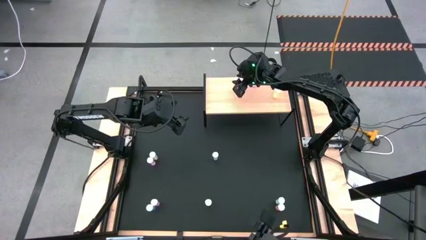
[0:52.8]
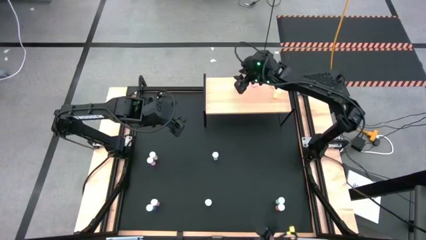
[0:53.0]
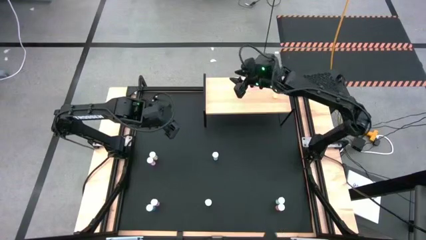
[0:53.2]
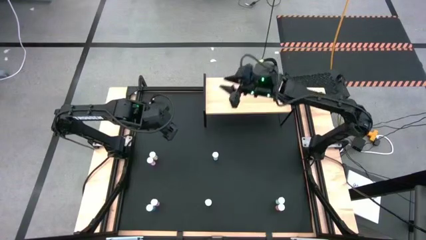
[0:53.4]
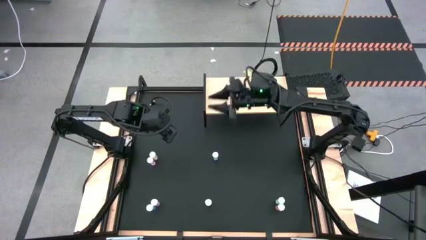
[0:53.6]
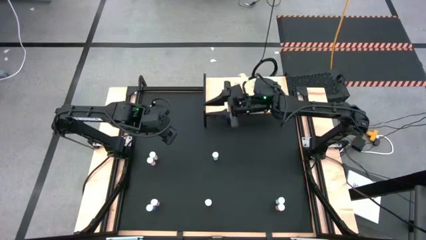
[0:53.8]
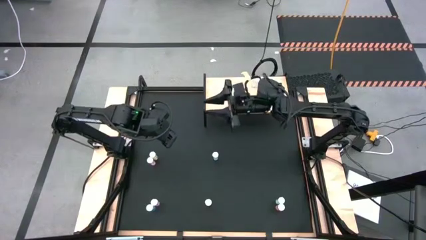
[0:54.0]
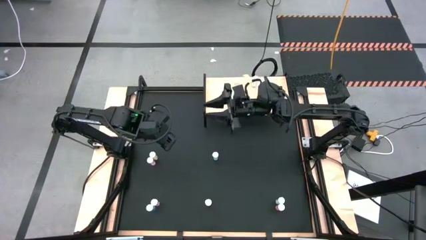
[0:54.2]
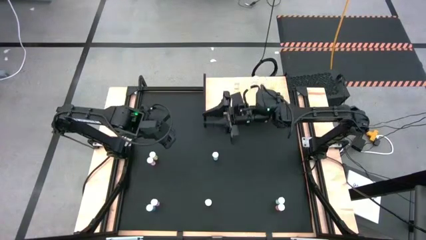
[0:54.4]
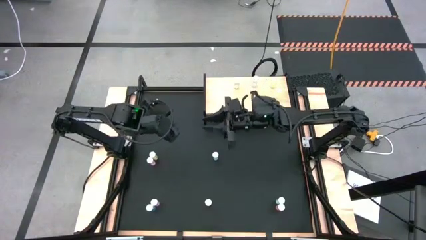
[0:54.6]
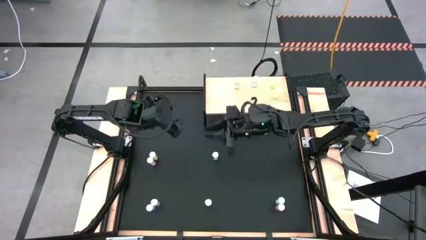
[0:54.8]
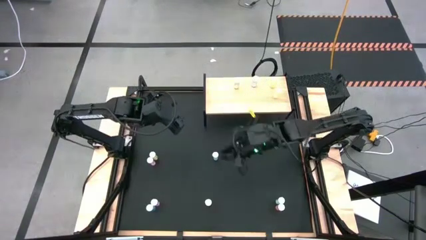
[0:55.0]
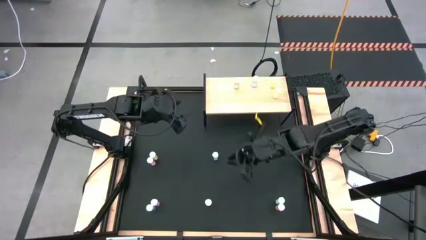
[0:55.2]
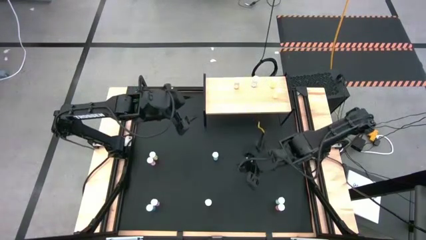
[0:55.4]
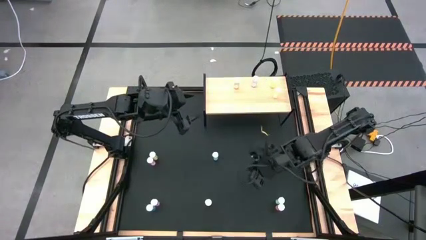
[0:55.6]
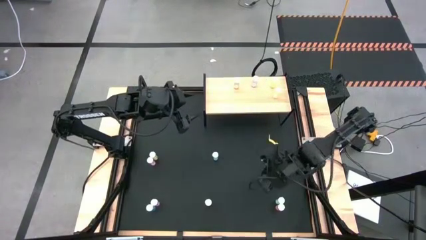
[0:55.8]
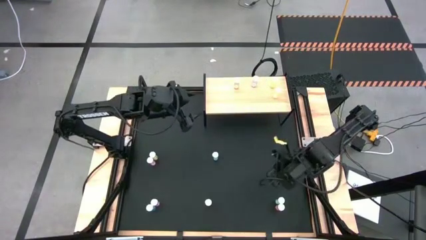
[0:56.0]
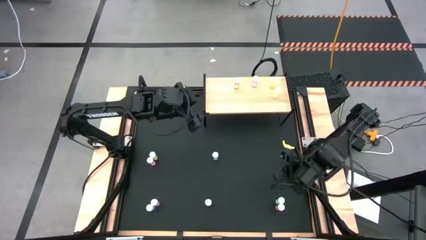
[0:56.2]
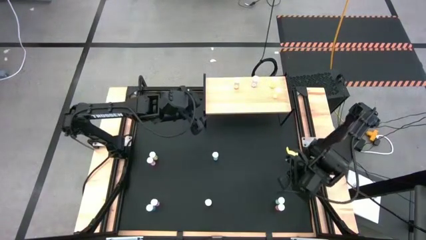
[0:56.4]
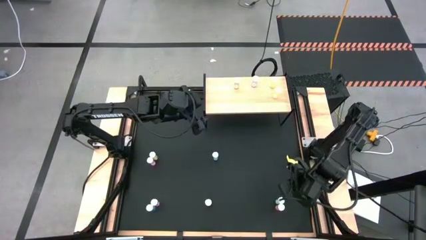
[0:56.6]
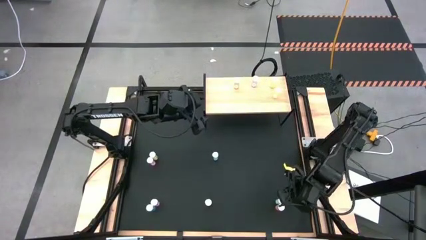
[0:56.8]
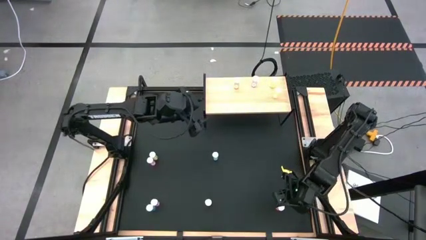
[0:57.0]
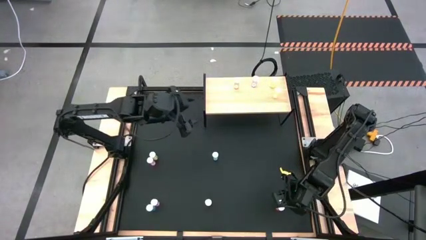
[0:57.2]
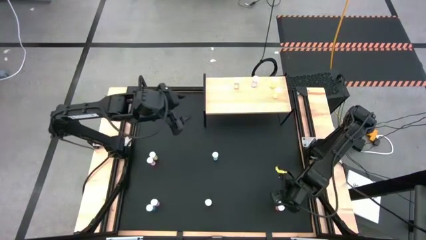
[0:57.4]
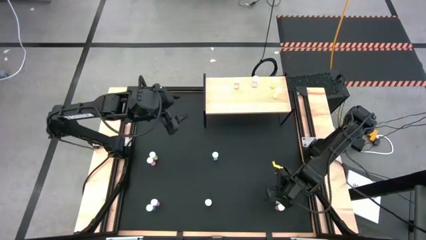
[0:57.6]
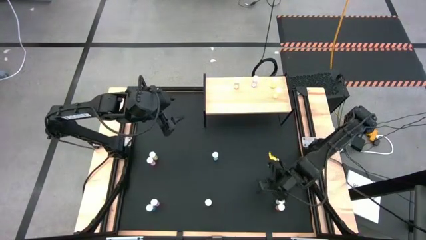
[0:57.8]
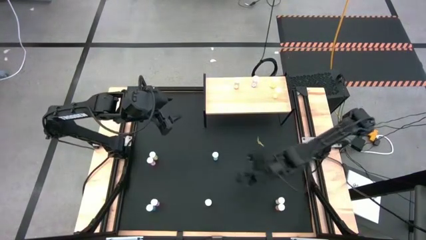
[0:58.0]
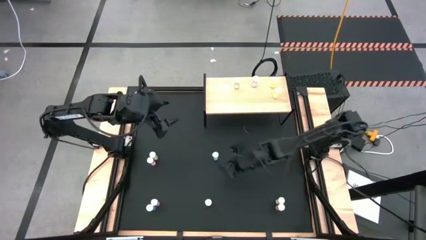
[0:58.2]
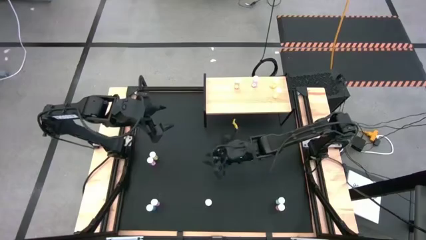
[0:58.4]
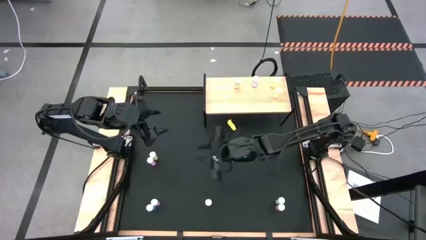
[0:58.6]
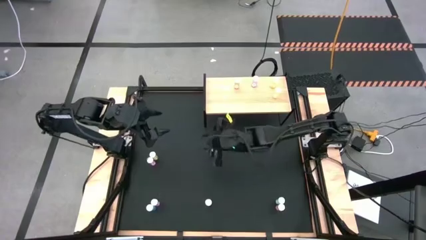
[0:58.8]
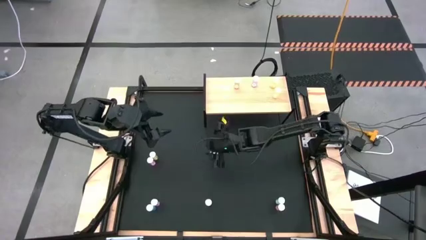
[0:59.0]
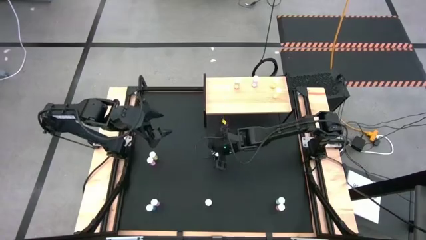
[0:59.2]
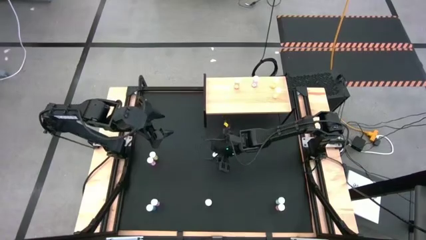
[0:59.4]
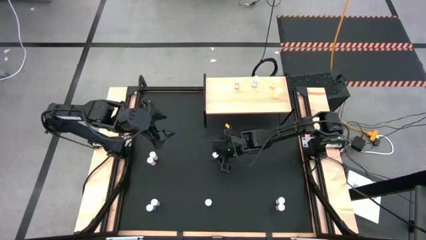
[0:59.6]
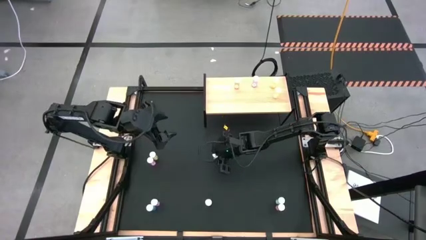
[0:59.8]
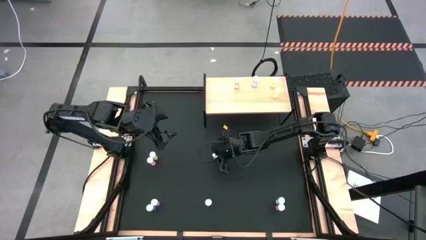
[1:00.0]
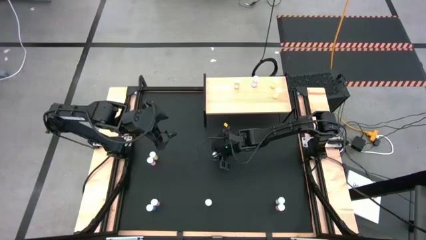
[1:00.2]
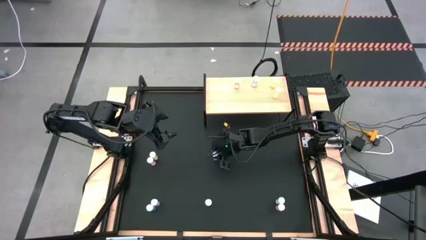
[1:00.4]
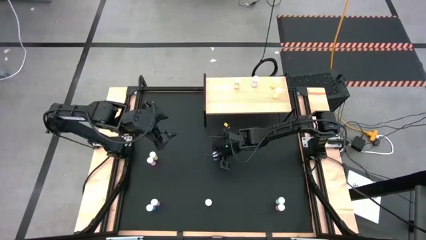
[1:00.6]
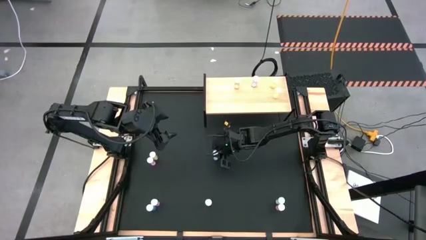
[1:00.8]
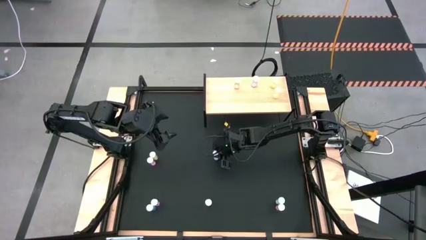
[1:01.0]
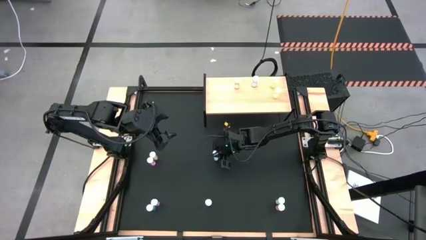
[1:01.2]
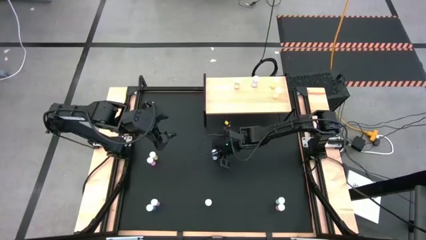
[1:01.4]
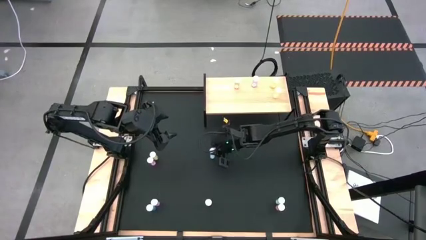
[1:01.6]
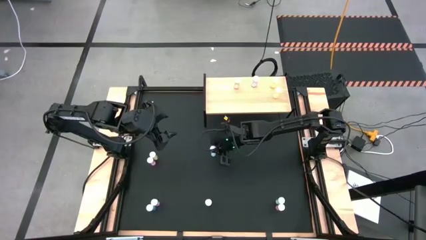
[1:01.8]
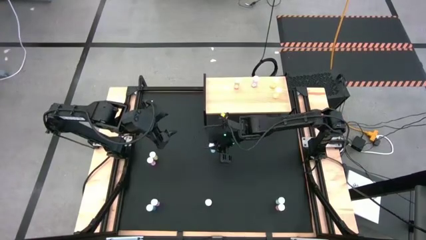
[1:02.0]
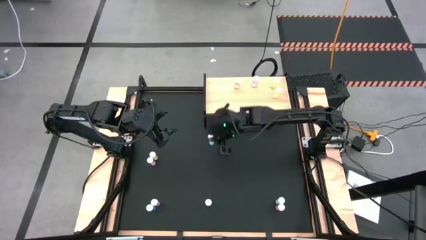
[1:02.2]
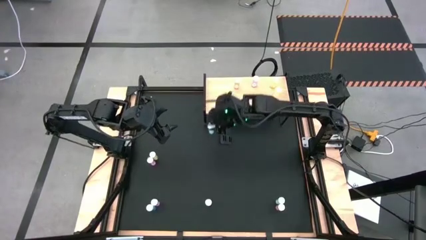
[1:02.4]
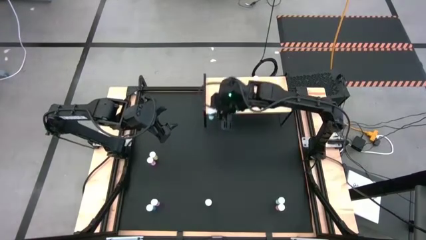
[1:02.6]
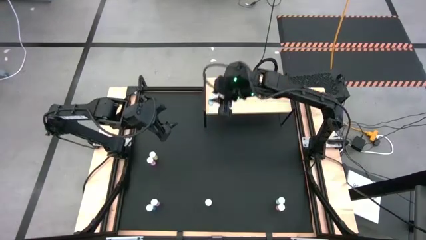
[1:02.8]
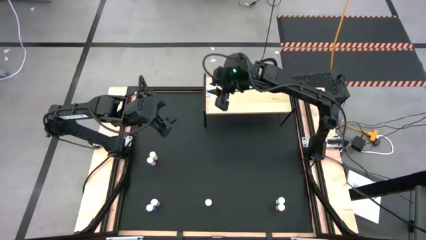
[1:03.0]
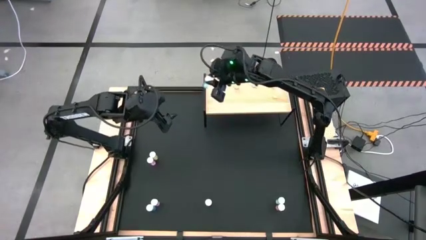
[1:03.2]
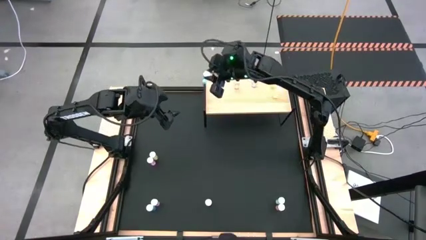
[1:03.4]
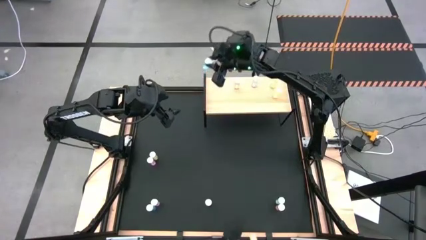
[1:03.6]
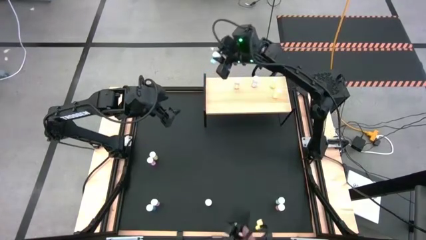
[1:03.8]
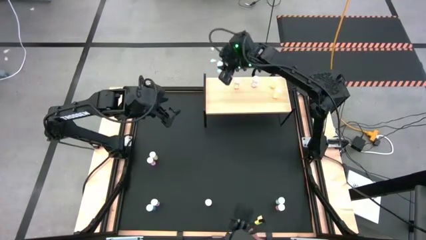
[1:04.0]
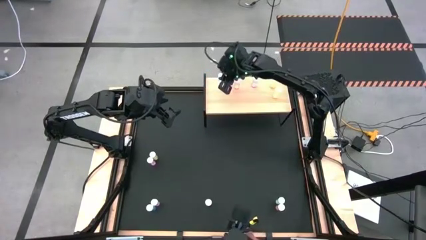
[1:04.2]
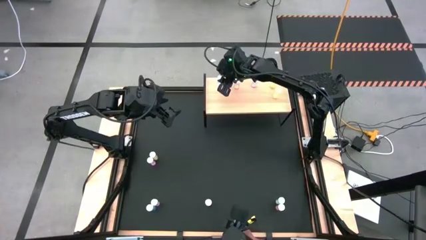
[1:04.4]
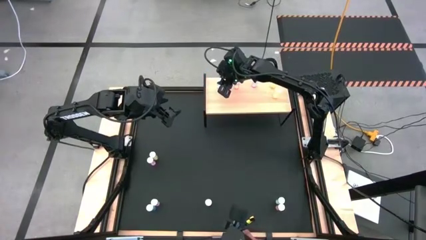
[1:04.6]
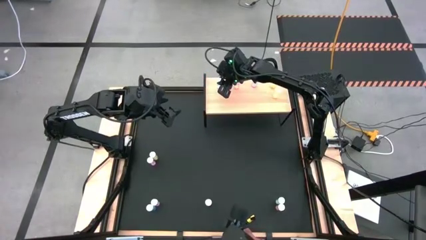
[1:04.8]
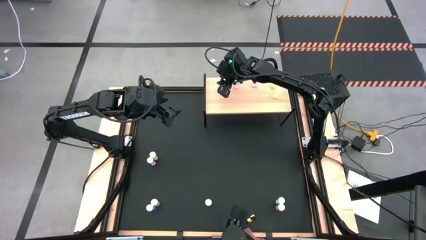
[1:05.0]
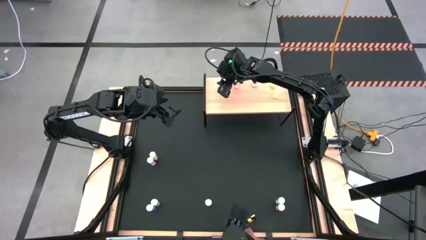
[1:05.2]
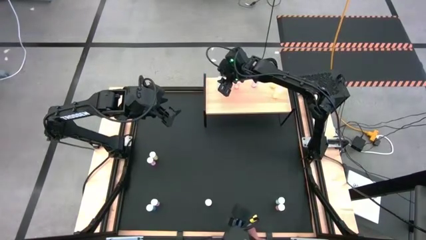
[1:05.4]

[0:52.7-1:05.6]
Task: Pick and place medicine bottles onto shelf by color
Put the top middle blue pill bottle on the shelf

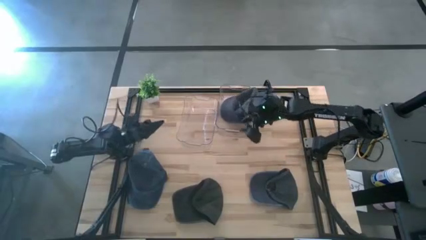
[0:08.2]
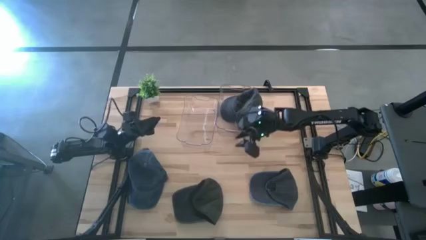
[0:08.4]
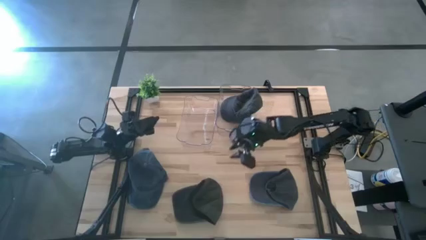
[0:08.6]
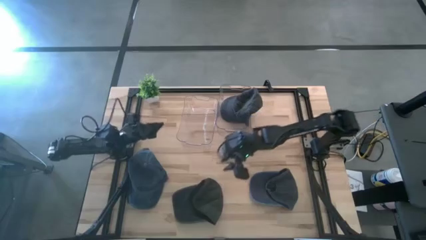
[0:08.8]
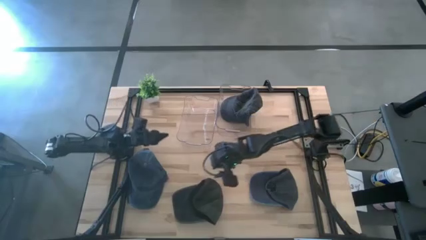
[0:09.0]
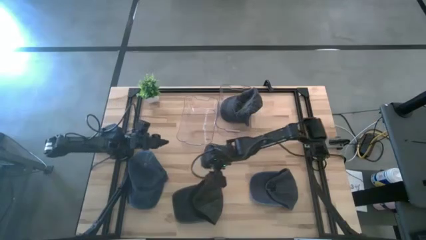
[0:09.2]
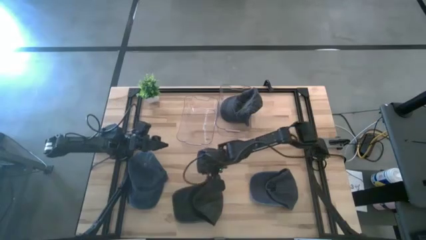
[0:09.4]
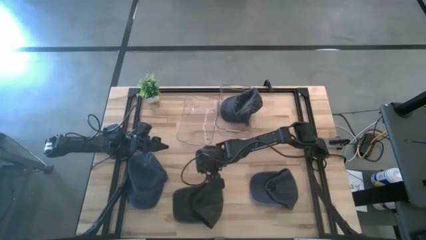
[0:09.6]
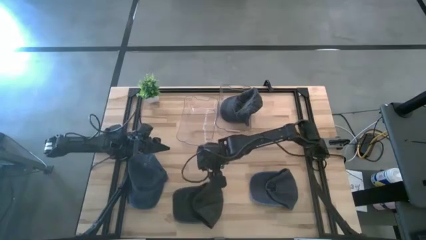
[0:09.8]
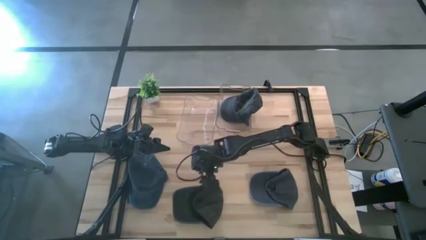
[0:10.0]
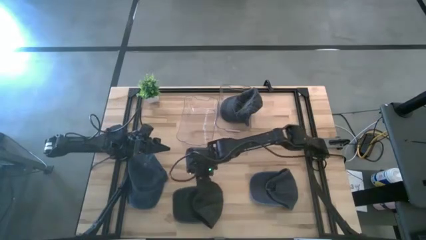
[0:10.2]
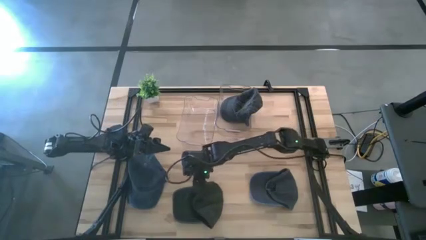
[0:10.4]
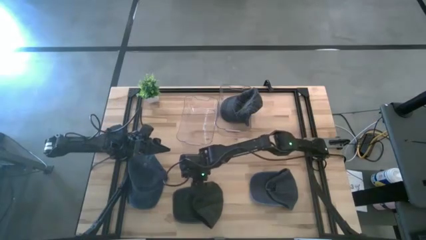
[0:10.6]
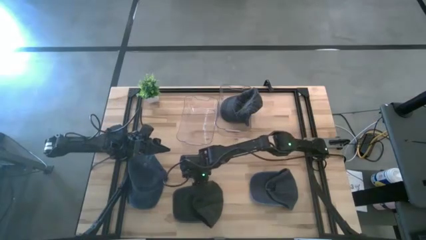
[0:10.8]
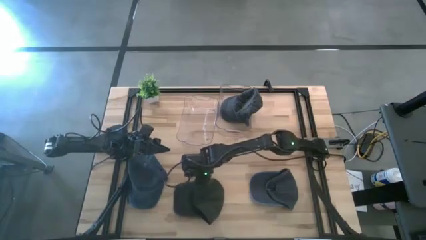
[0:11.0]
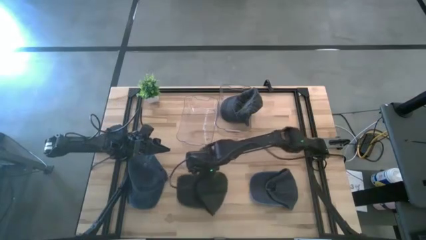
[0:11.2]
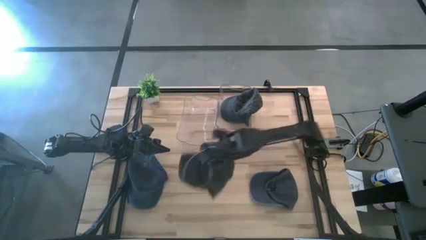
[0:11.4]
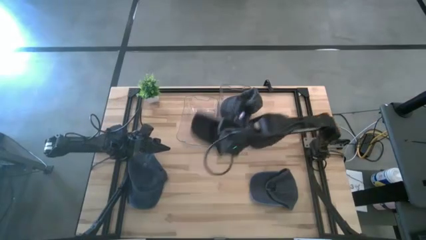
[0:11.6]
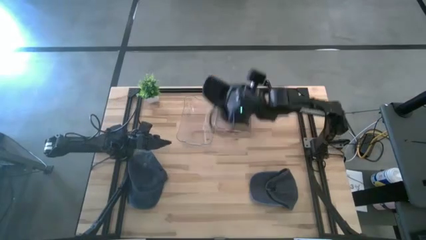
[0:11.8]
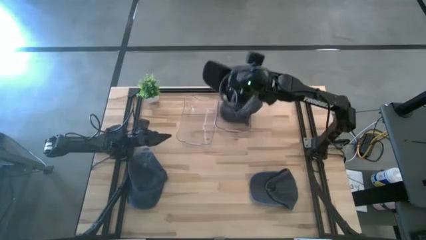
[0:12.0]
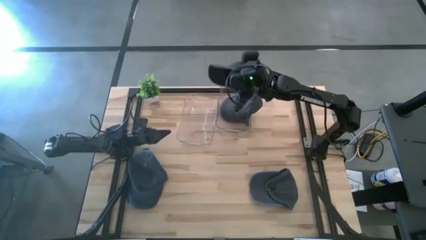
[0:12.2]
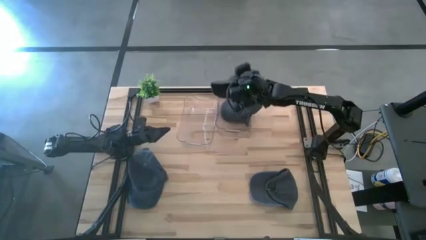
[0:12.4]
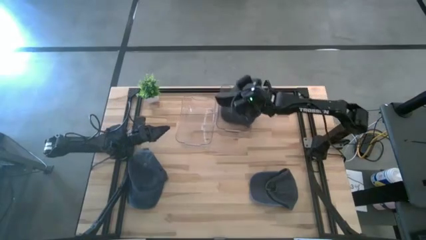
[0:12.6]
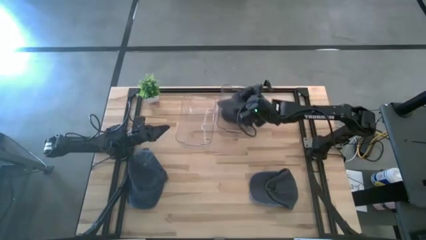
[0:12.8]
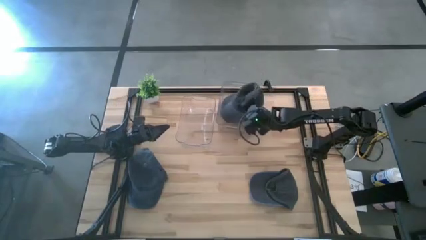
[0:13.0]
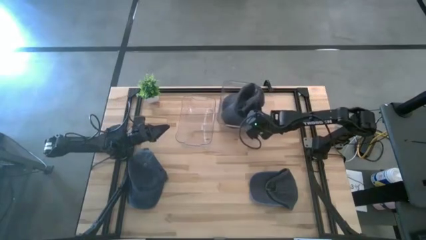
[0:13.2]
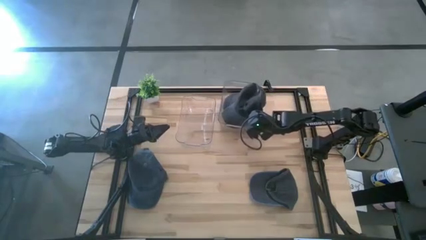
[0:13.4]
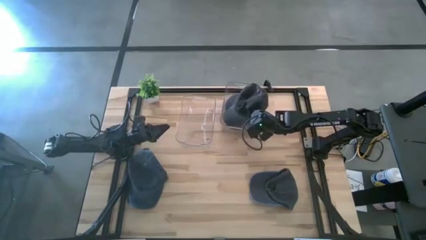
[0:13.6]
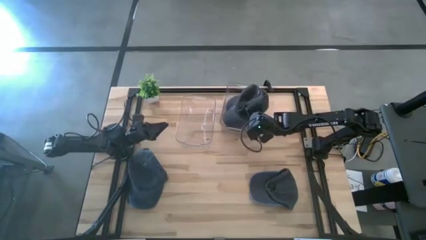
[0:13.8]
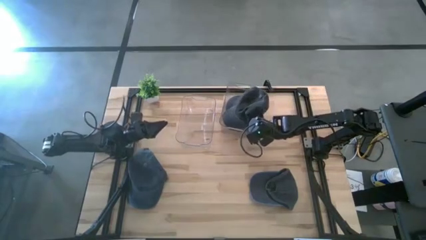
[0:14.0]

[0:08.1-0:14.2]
Task: Pick & Place hat
Put the black cap into the right transparent bin
